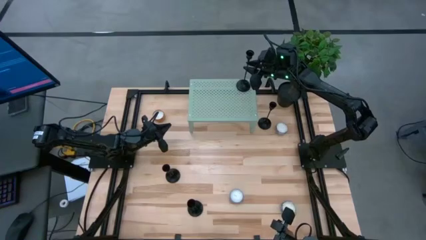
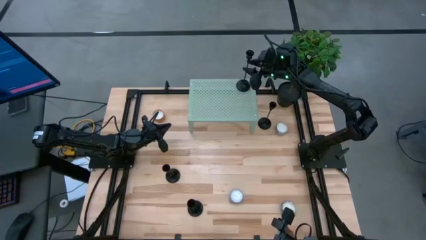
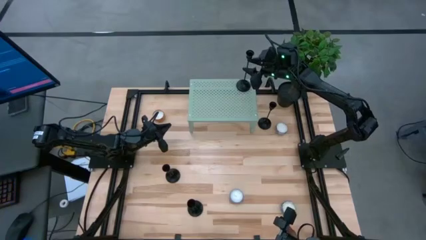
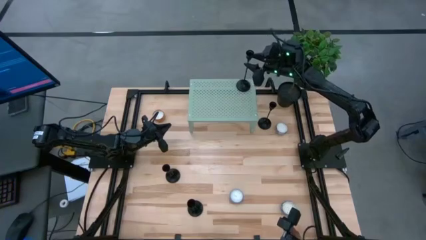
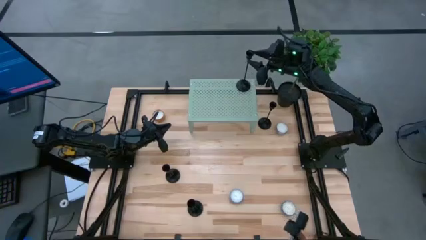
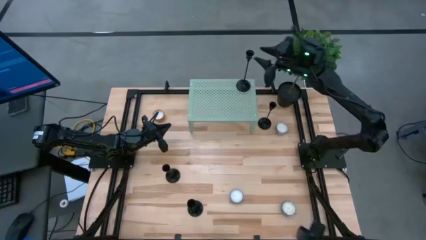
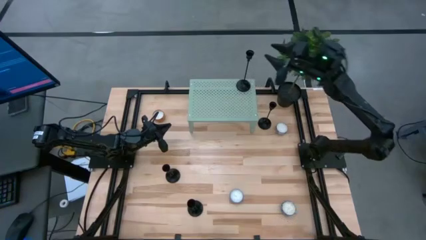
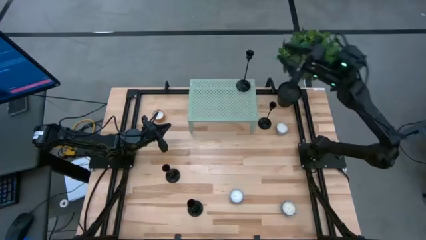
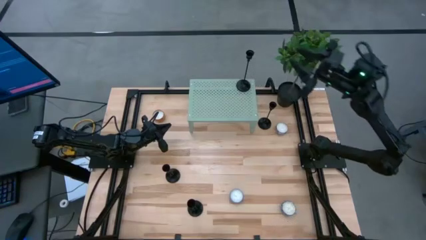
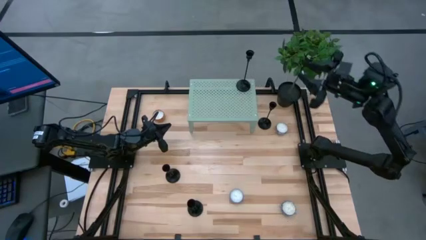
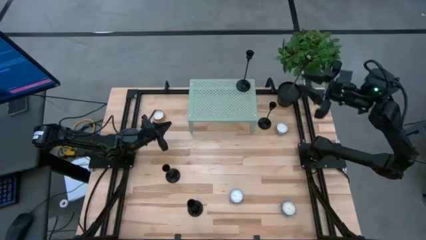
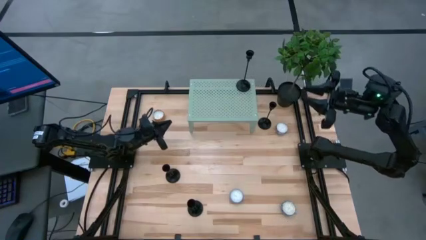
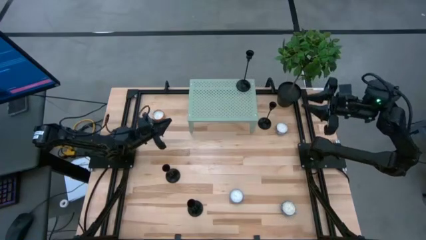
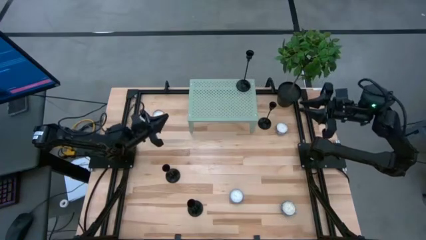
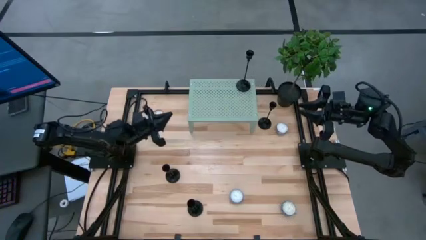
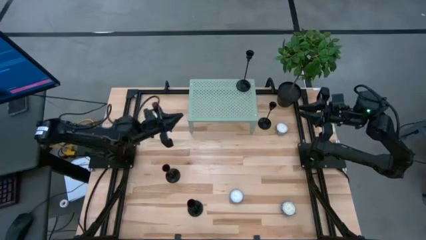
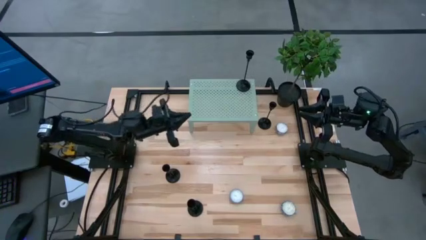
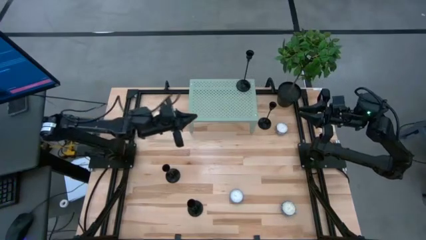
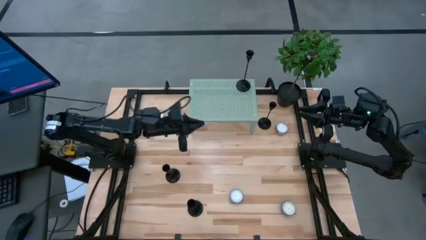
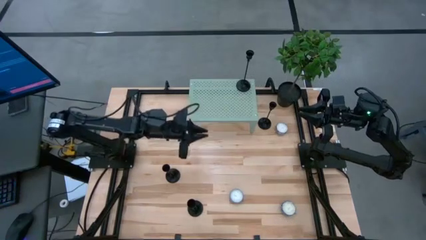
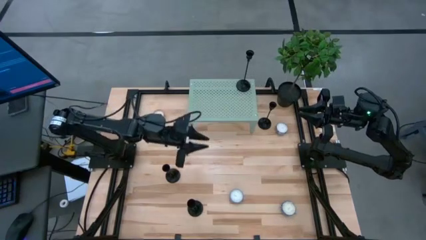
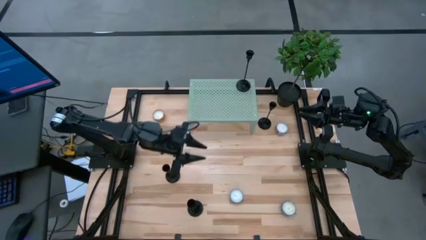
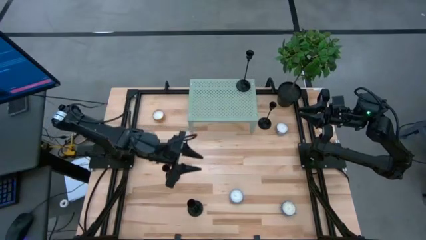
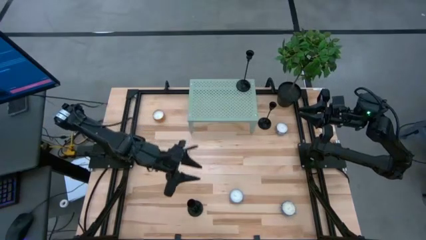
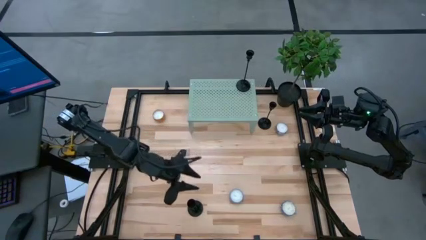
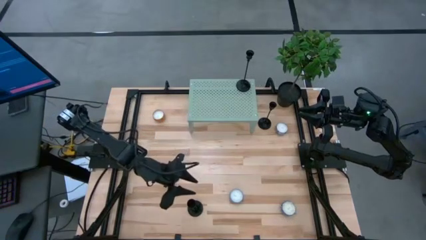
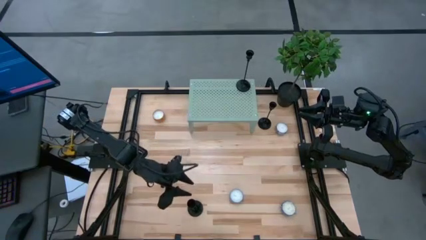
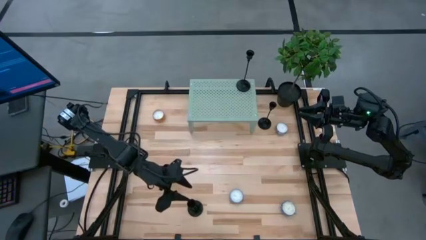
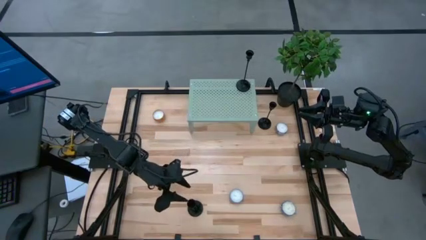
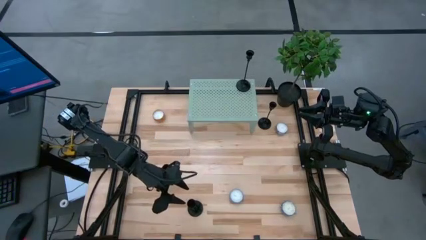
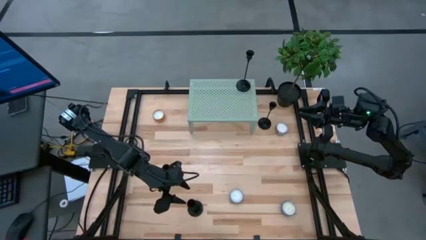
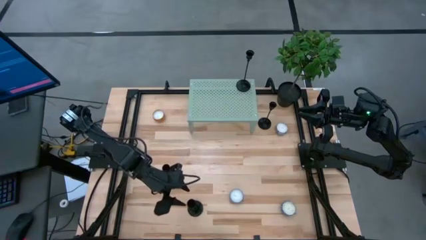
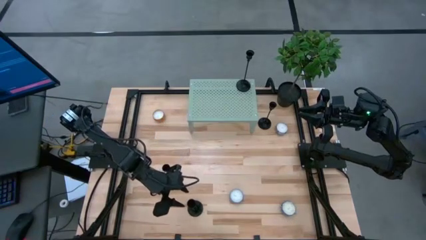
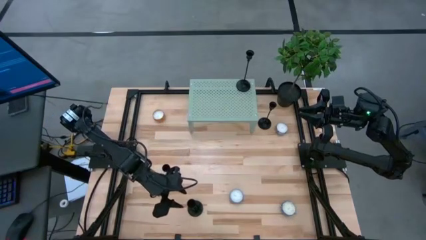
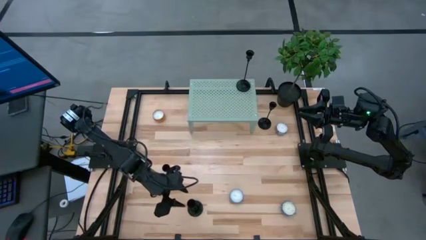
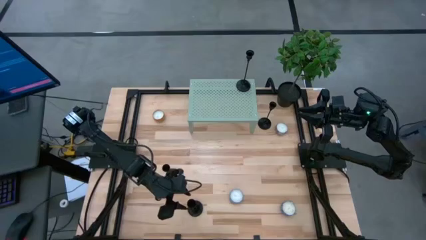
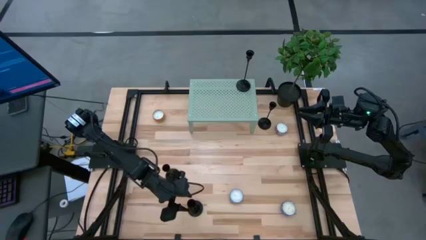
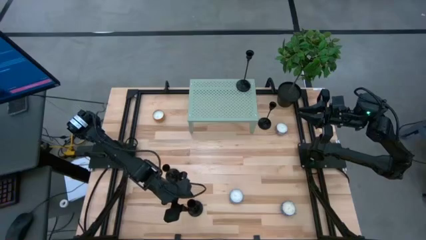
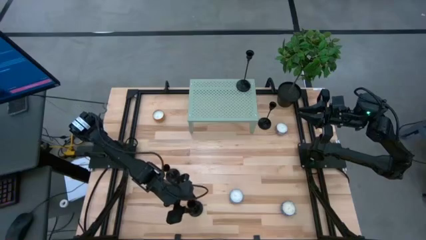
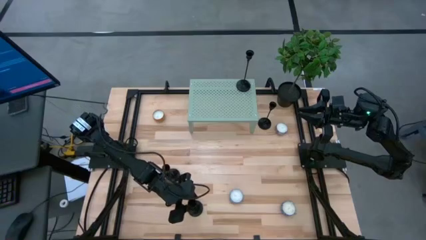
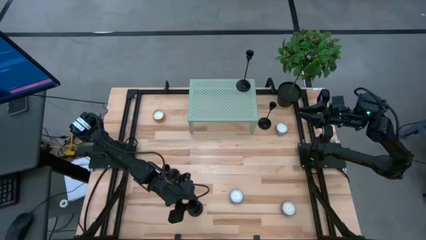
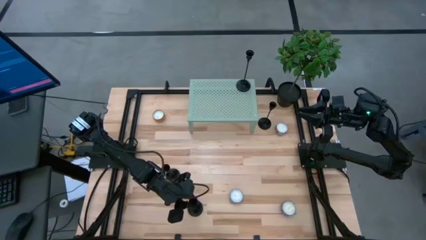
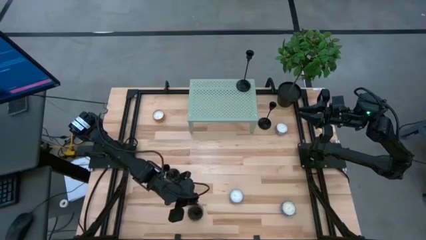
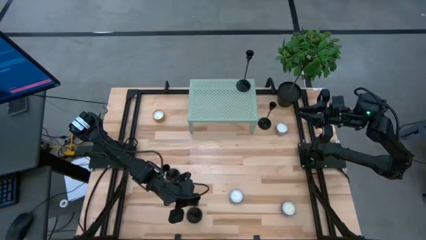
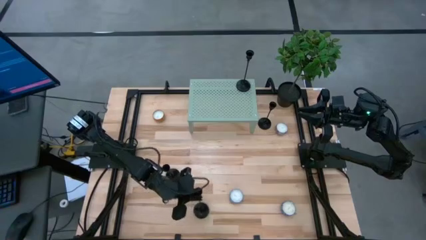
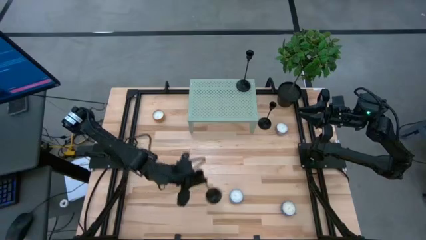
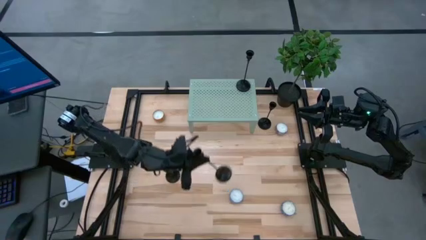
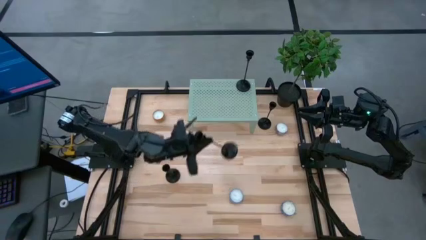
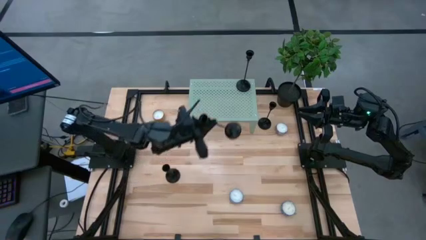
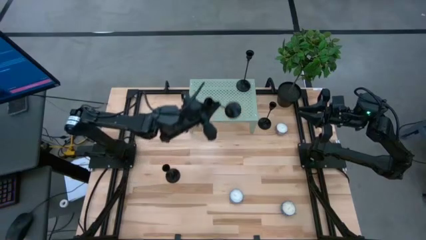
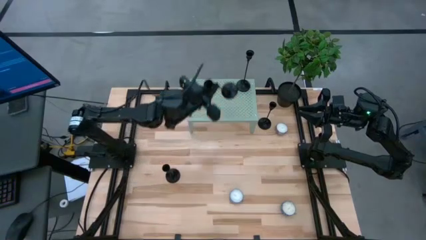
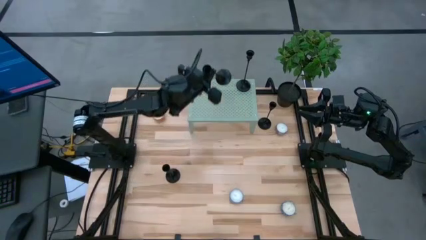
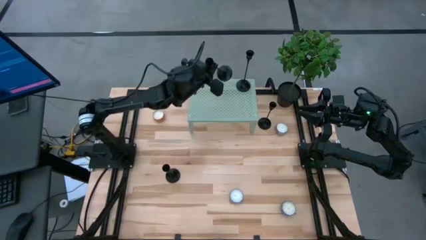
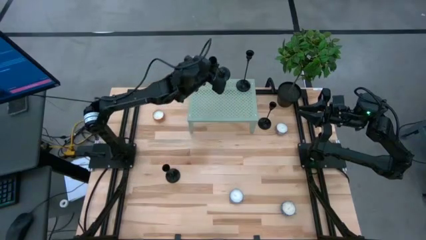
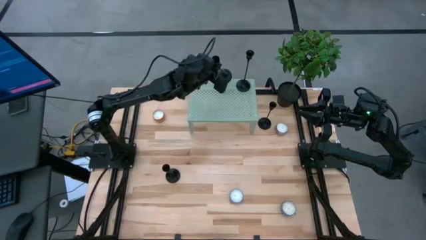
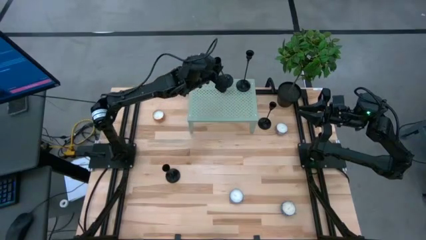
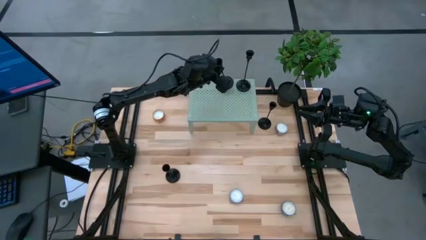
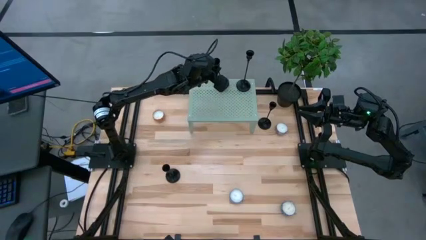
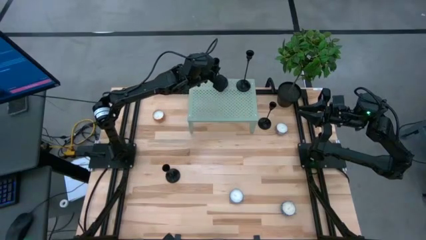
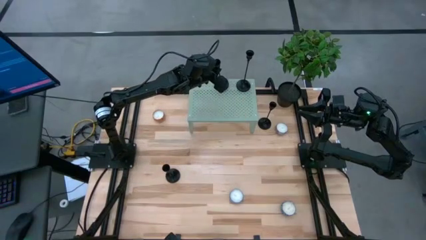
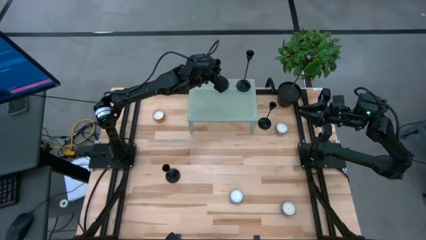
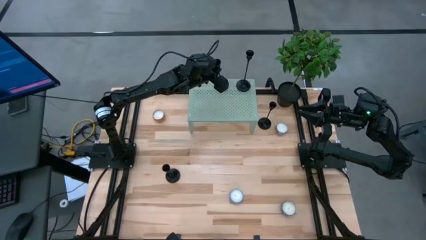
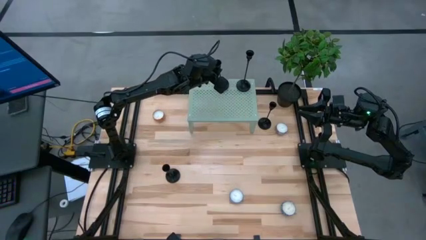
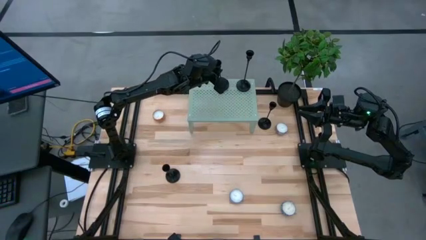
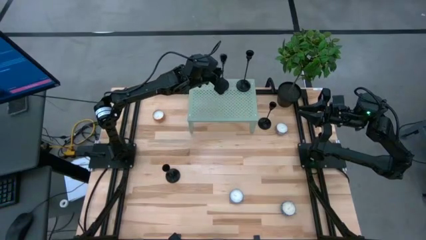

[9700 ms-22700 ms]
Task: Pick & Place candle stick holders
Put the black candle holder on the shelf

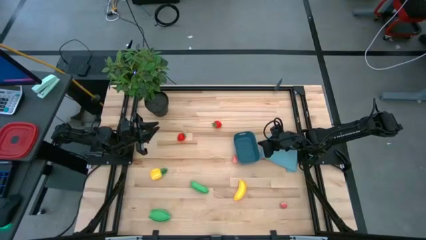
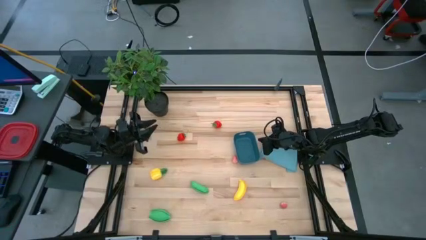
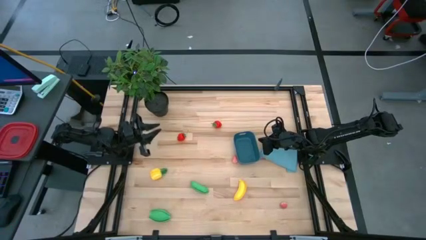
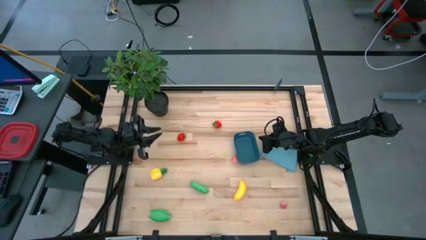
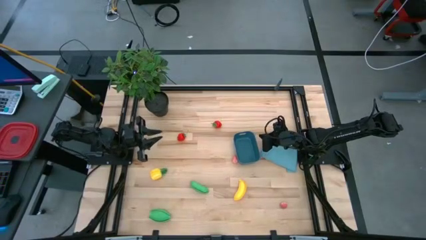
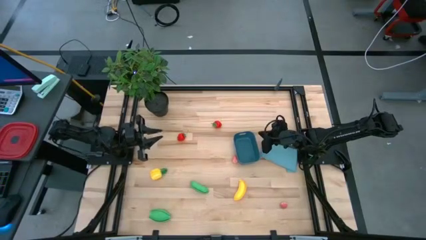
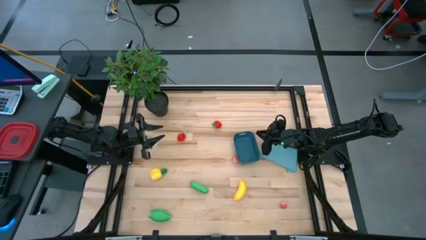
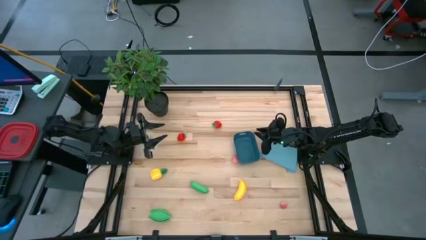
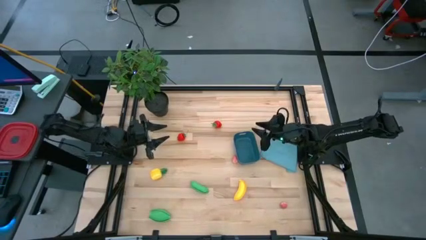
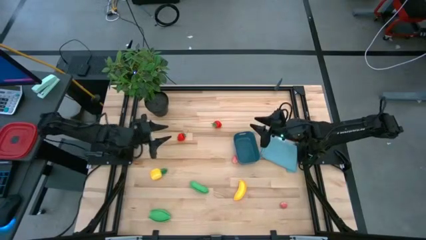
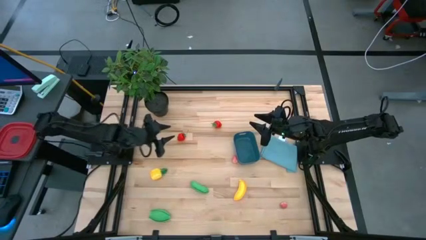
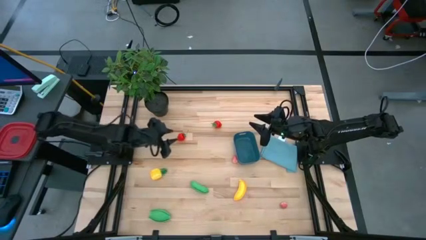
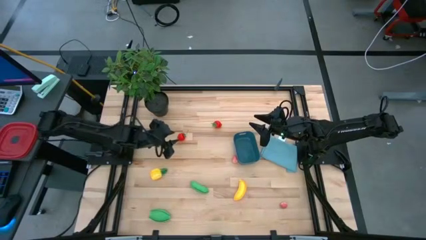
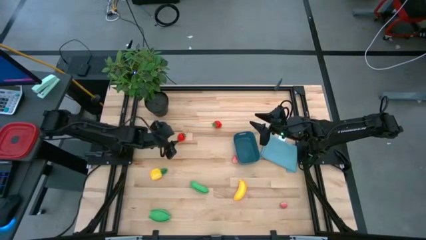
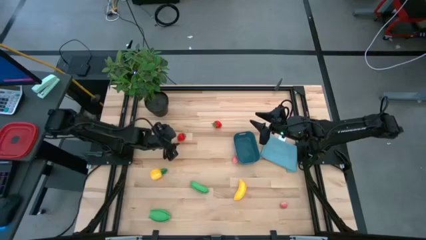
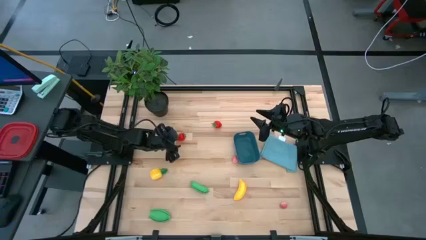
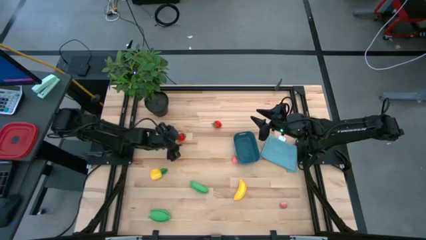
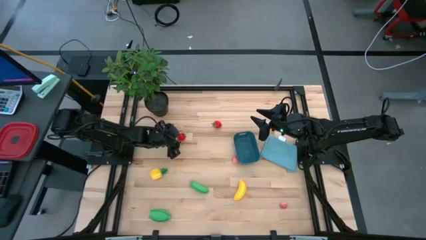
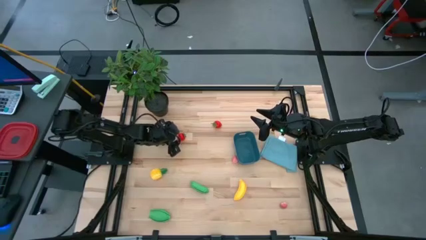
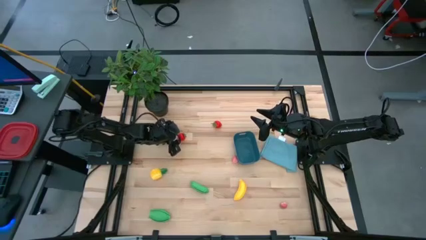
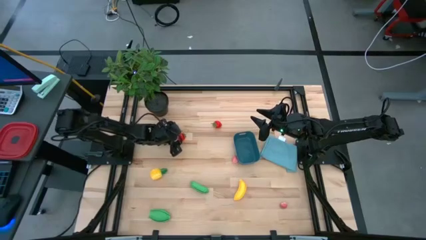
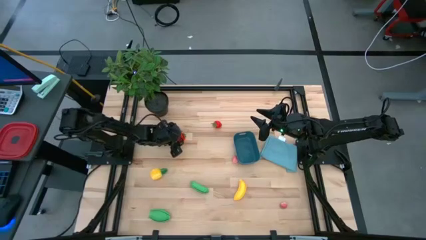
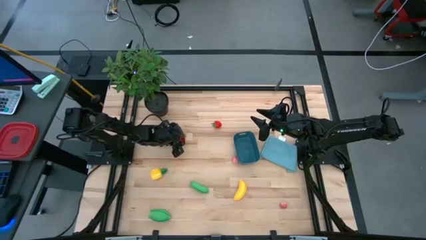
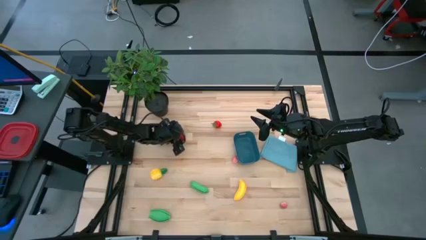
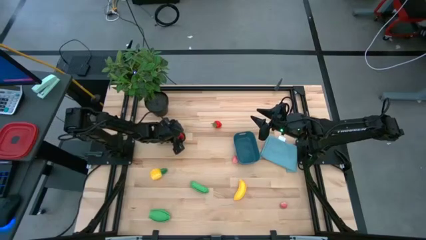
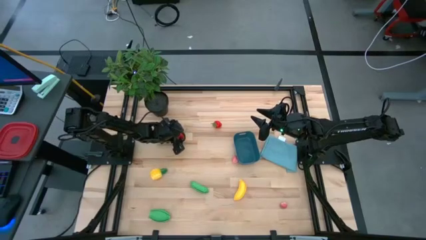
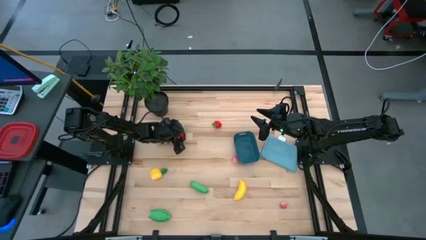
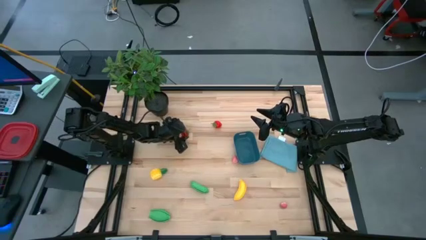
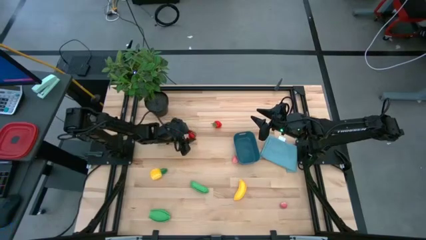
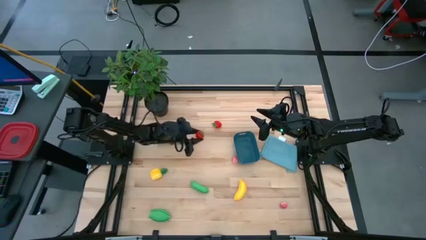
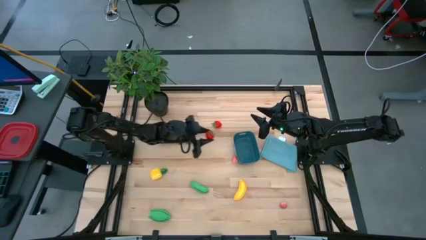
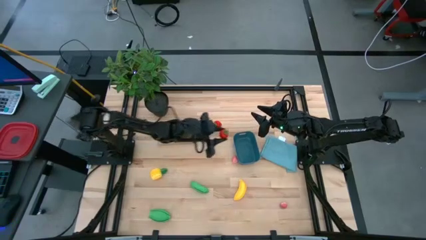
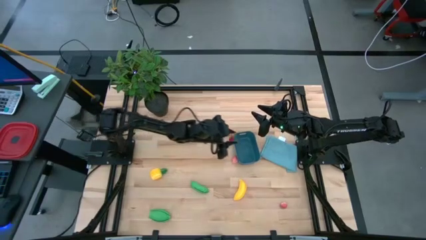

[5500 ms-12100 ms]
Task: Pick and placing Produce into tupperware
Put the left red strawberry into the blue bin
